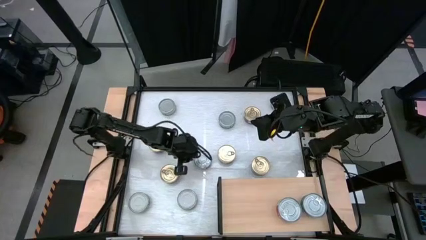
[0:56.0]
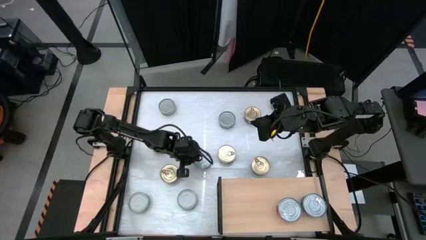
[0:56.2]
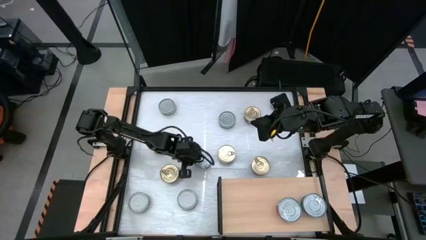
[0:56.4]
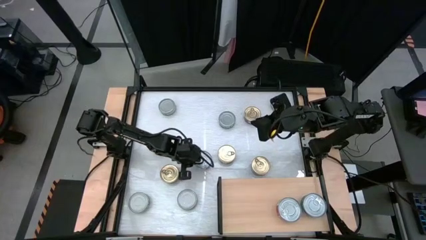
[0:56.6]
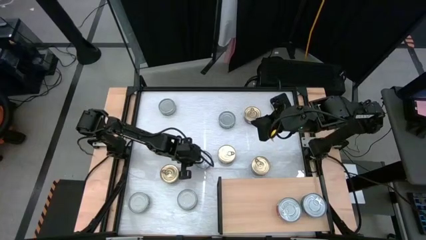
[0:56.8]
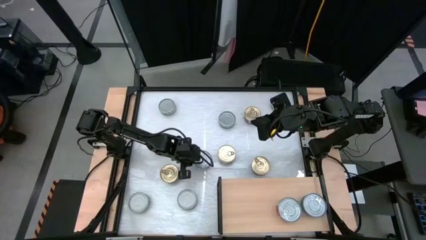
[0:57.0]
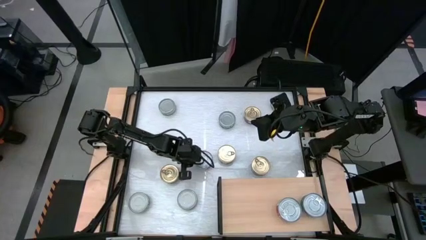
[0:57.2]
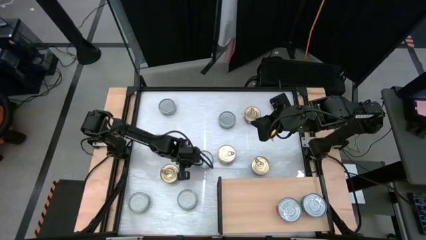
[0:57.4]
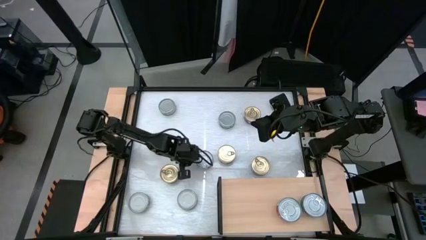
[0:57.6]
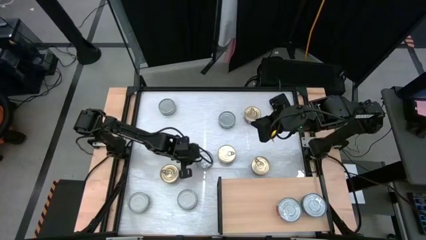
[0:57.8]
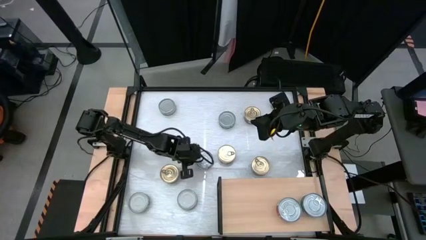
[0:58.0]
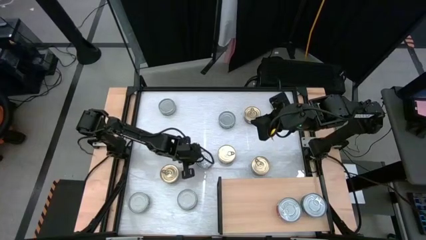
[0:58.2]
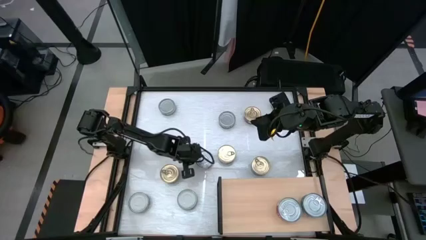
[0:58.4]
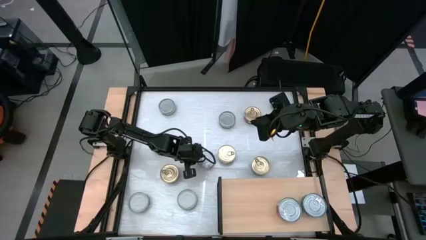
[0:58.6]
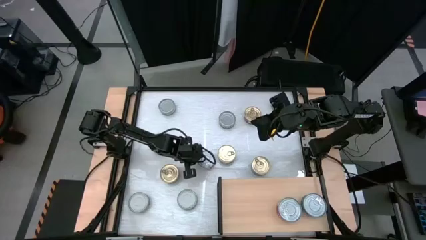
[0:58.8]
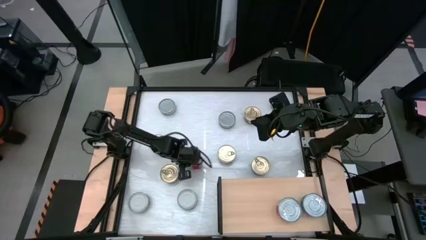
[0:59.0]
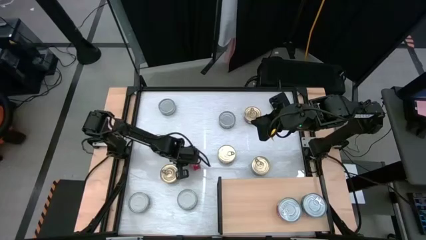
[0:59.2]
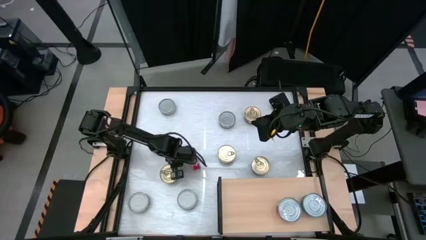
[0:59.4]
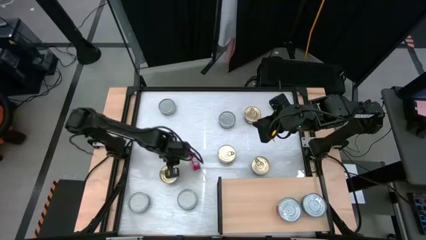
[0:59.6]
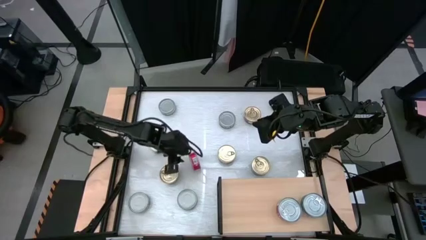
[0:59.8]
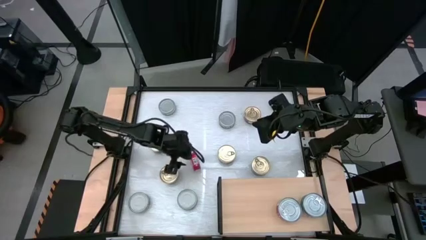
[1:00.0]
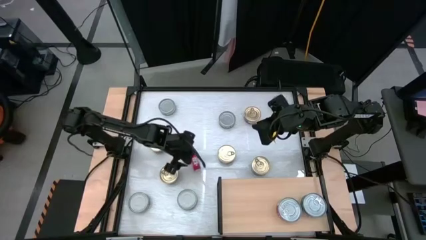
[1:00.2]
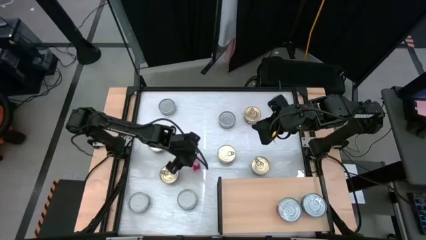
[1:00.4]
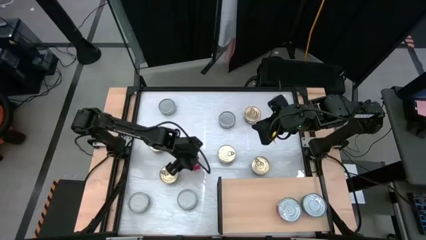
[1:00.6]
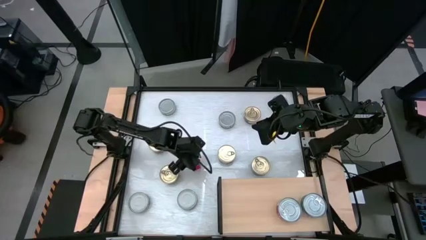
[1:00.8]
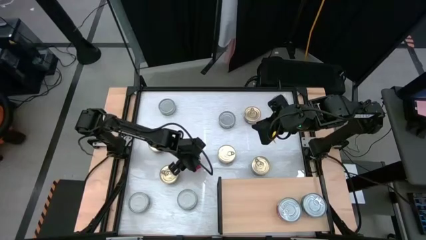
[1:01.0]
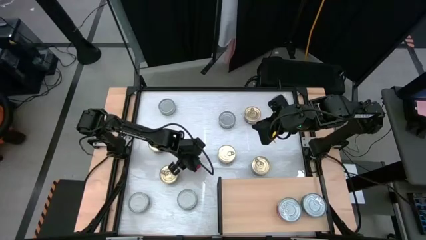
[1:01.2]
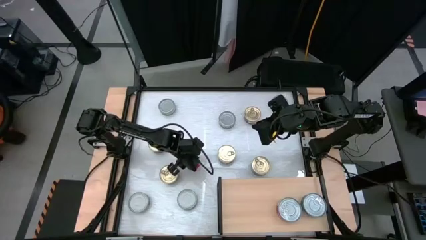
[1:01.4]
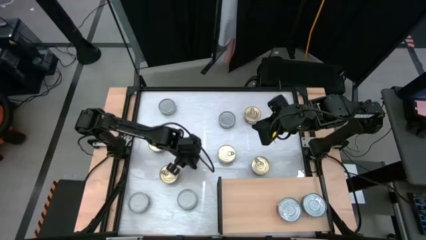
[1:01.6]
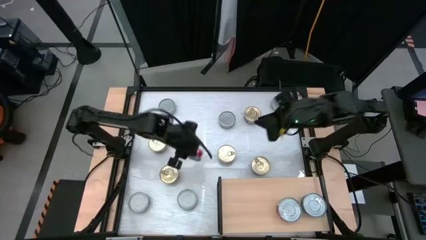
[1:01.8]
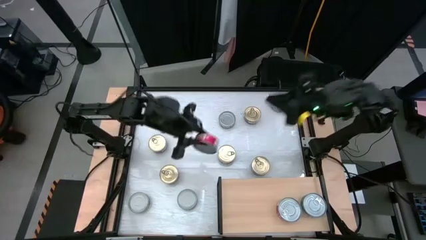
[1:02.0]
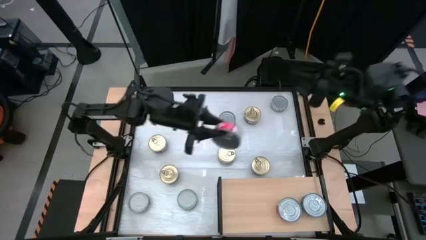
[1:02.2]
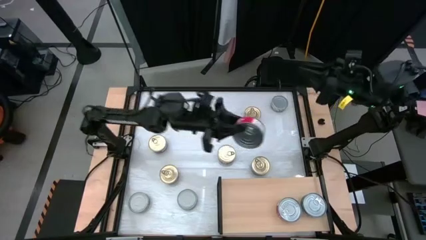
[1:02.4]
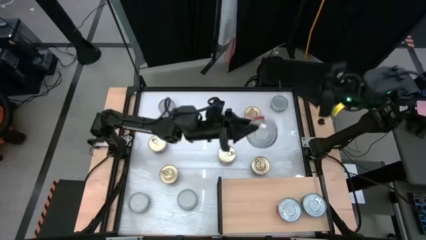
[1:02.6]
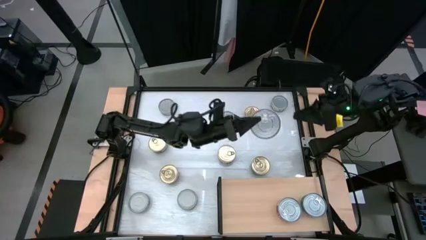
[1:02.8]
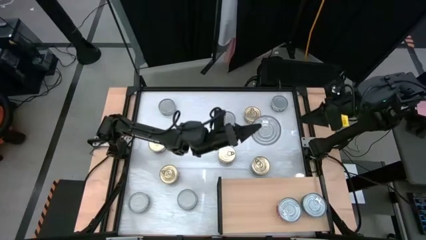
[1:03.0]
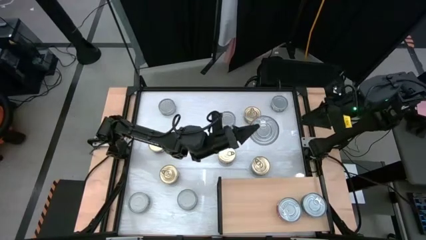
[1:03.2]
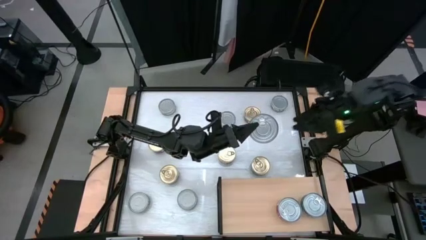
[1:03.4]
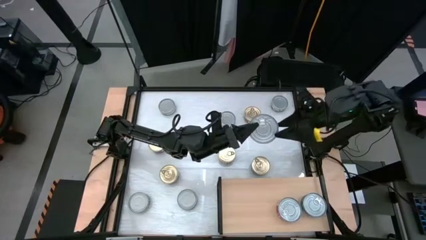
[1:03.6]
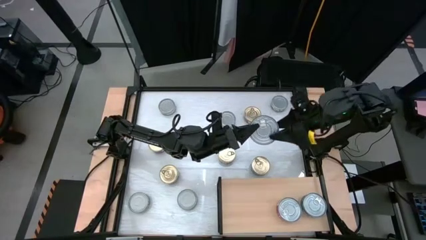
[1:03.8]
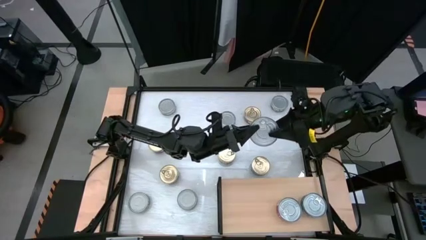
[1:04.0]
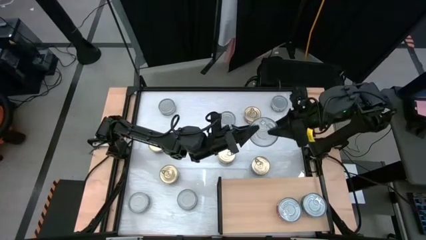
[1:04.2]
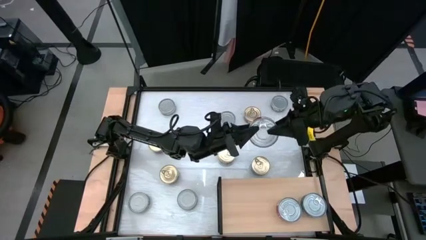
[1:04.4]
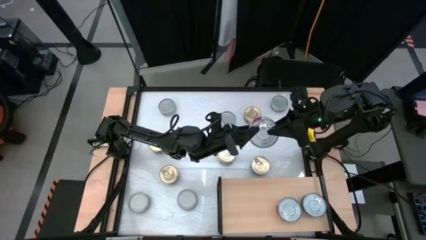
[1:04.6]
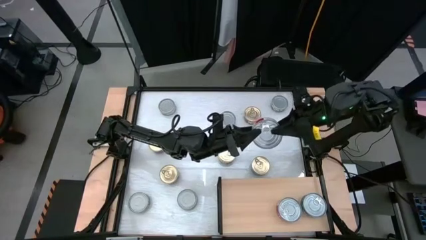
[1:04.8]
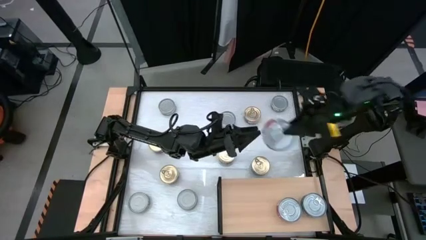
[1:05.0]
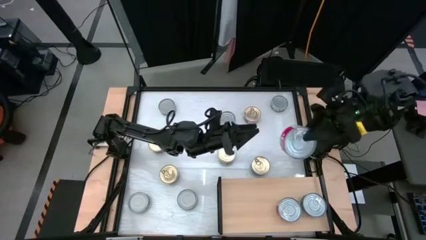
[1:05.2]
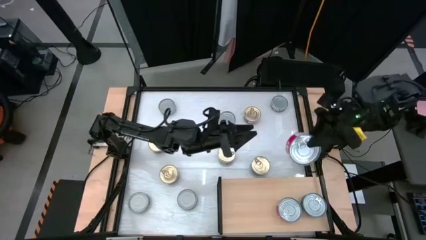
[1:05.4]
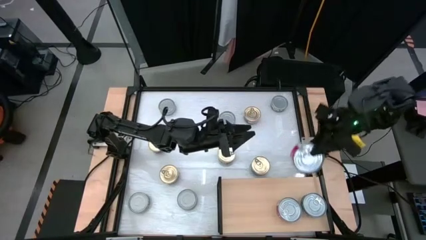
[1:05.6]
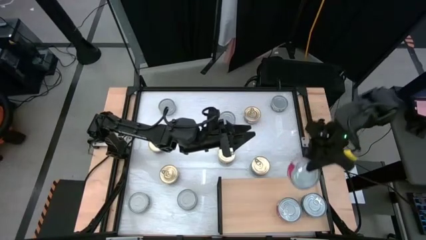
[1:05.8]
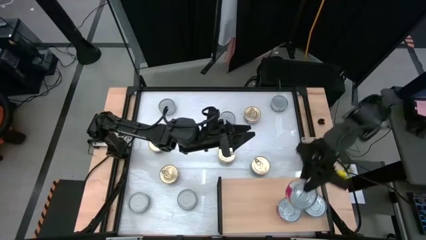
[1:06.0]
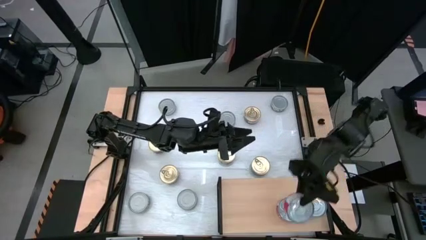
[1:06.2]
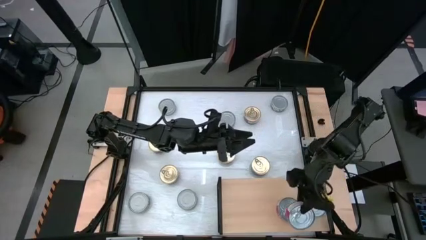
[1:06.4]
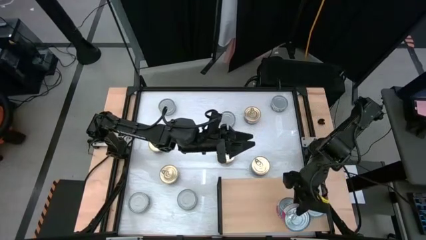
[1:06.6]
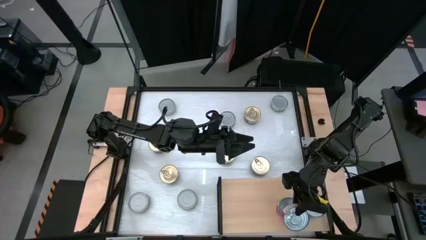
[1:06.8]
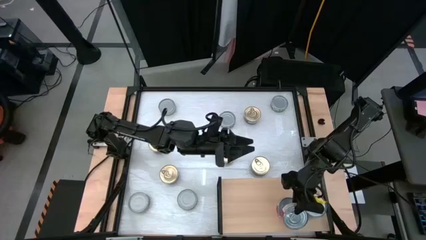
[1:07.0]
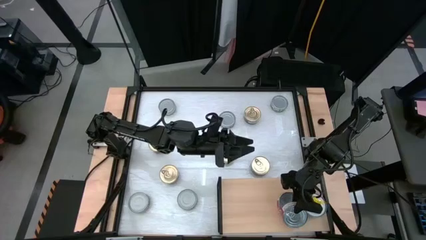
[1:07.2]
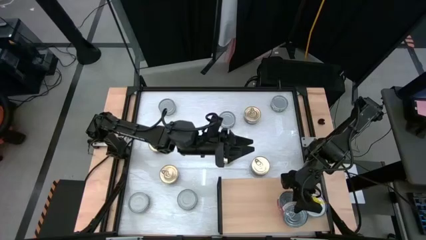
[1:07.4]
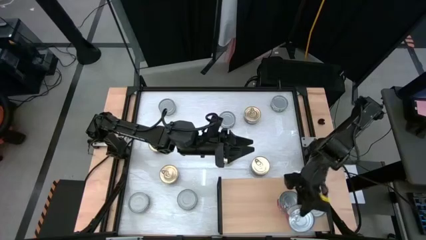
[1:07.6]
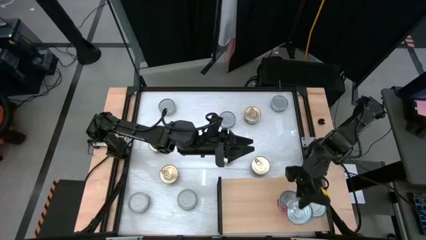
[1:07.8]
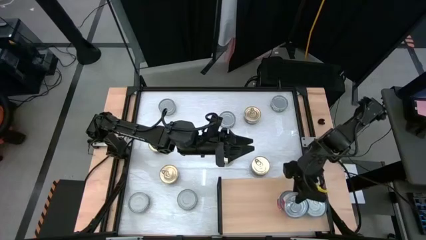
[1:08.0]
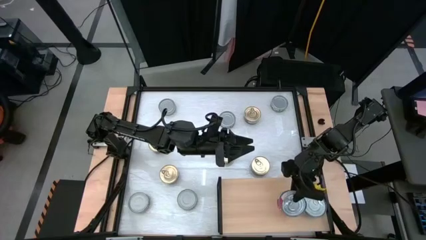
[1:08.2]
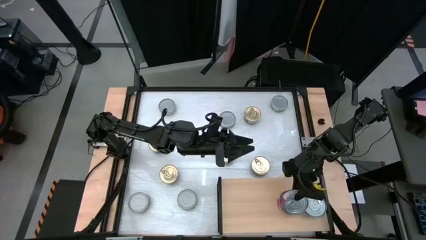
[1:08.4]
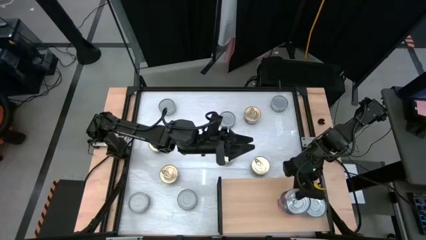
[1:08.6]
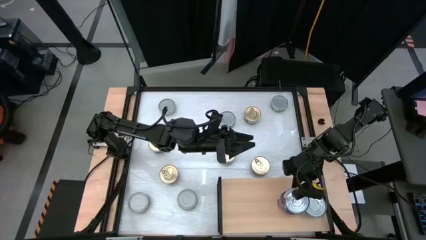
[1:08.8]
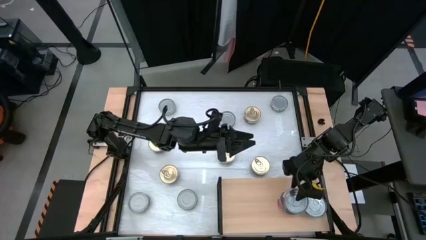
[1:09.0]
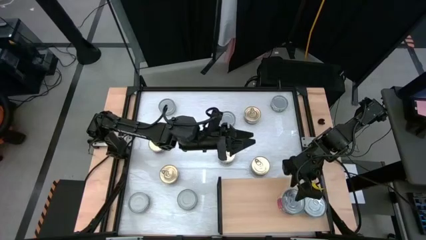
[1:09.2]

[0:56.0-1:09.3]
Task: Stack canned seafood by type on shelf
Stack the red tuna can on top of the other red tuna can on the shelf

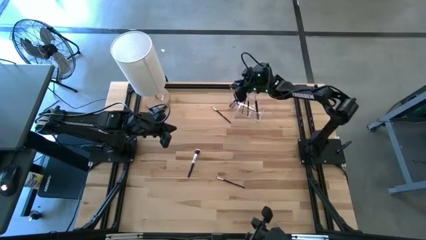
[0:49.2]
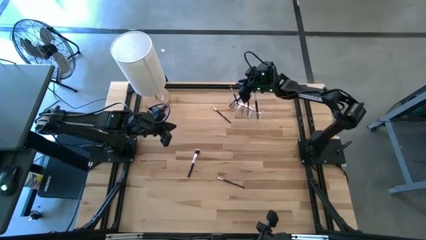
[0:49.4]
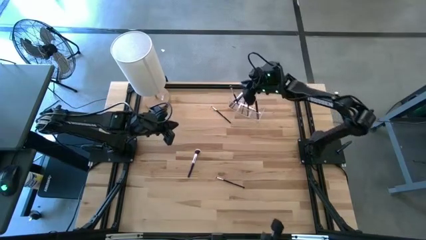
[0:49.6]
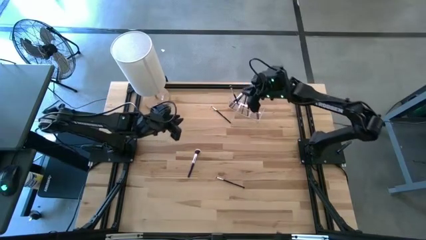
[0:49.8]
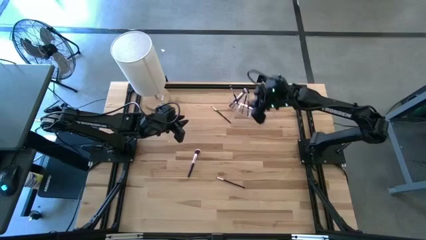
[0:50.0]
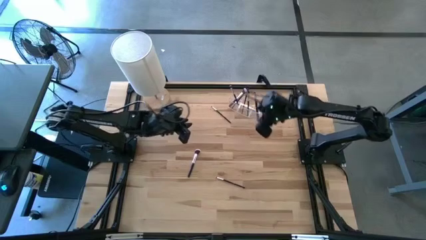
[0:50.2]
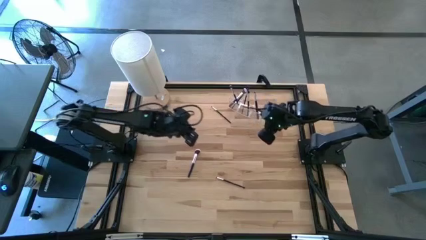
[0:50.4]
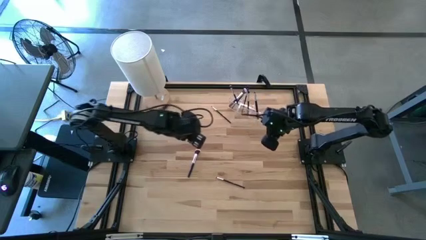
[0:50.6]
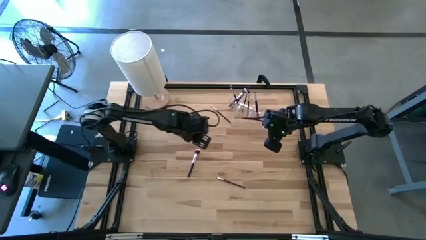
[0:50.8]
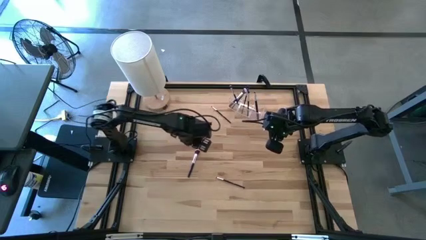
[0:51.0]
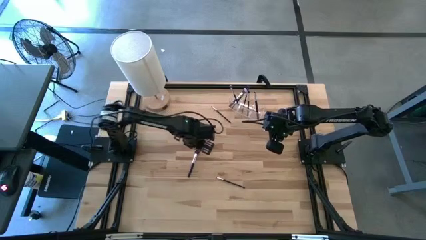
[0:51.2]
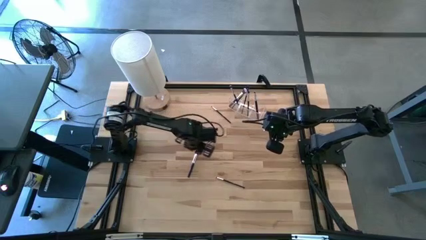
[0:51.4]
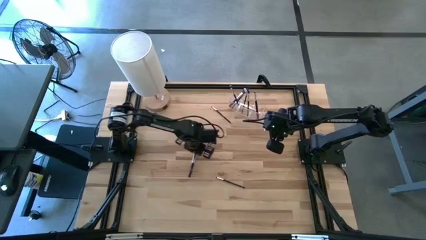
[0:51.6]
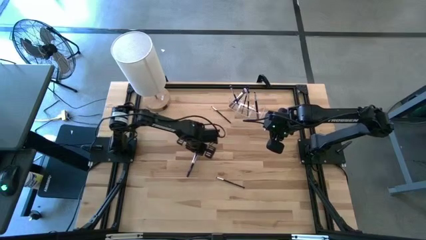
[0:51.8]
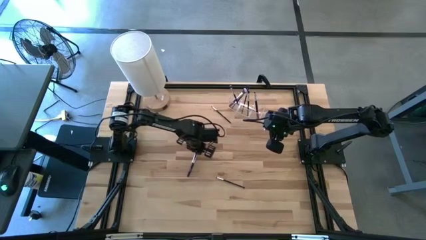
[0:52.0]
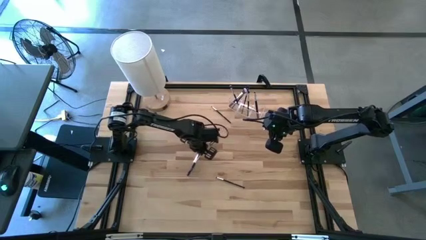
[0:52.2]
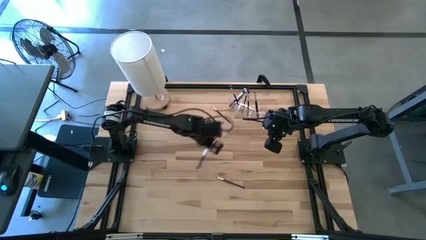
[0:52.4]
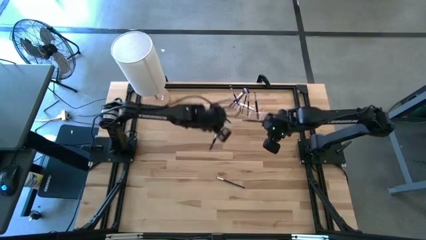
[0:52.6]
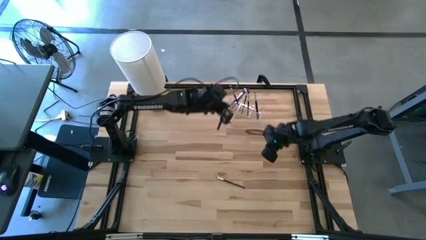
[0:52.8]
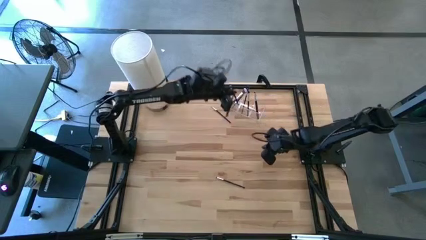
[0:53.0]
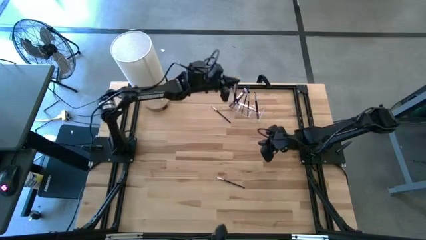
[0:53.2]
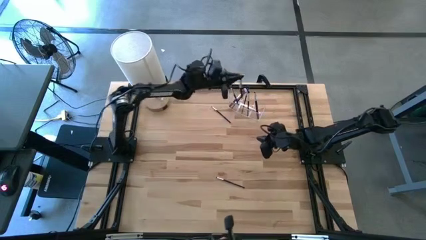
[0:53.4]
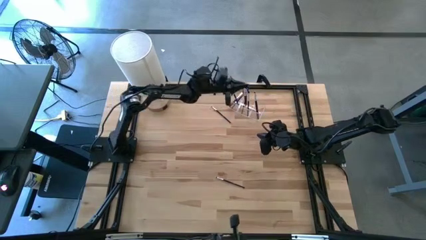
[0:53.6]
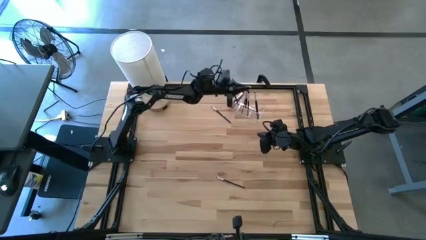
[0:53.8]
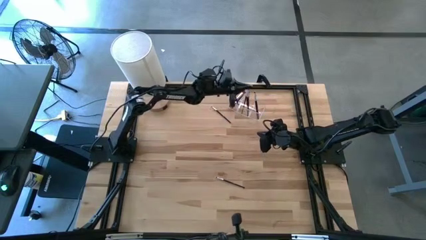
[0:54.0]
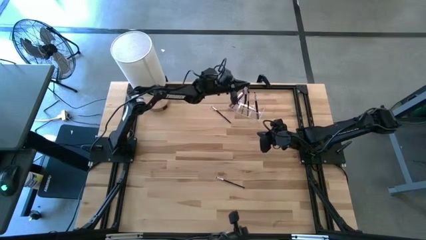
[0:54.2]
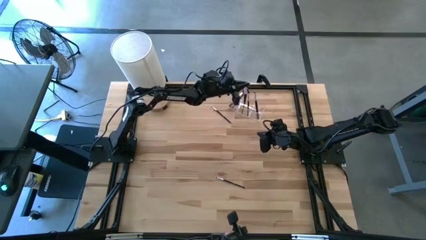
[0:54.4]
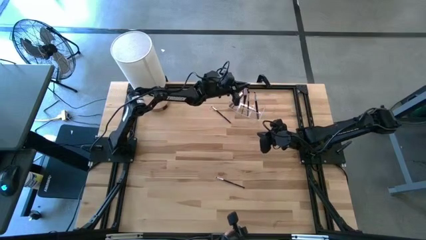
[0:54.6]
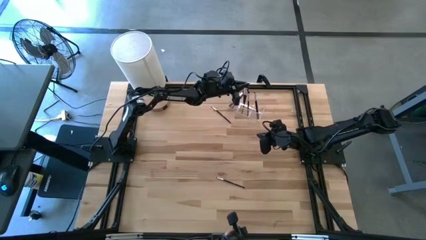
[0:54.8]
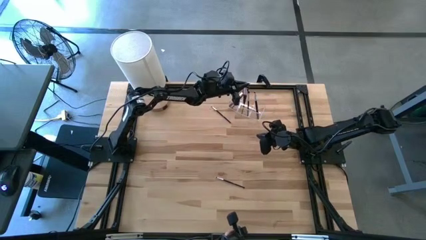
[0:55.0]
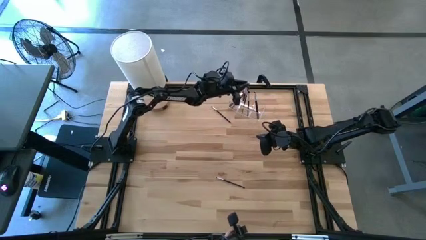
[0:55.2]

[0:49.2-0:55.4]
Task: Pick & Place Makeup Brushes
Put the black makeup brush into the transparent organizer
